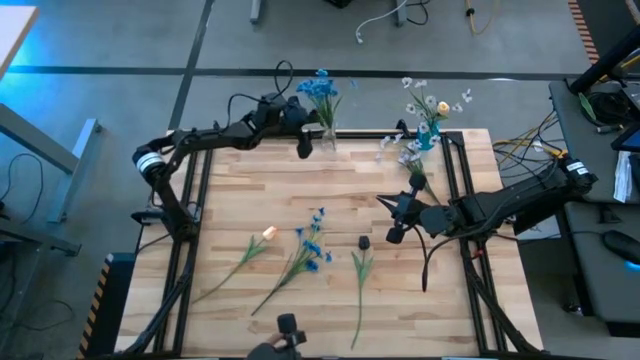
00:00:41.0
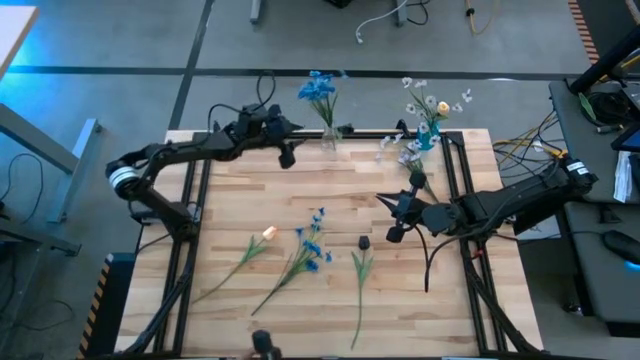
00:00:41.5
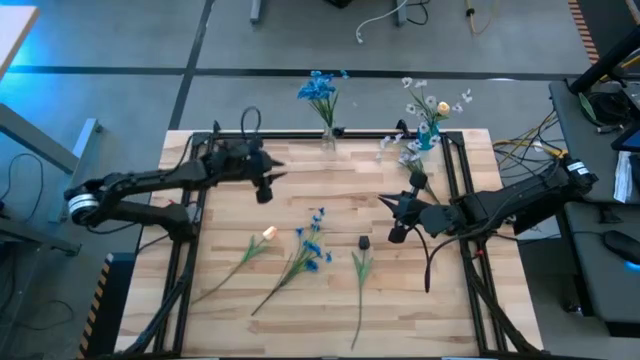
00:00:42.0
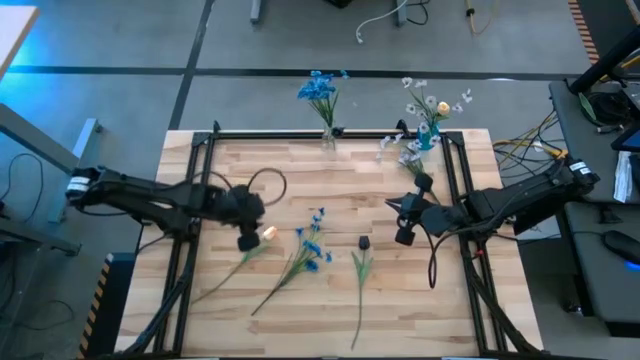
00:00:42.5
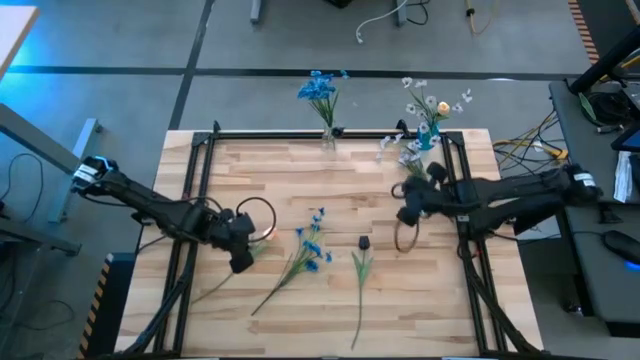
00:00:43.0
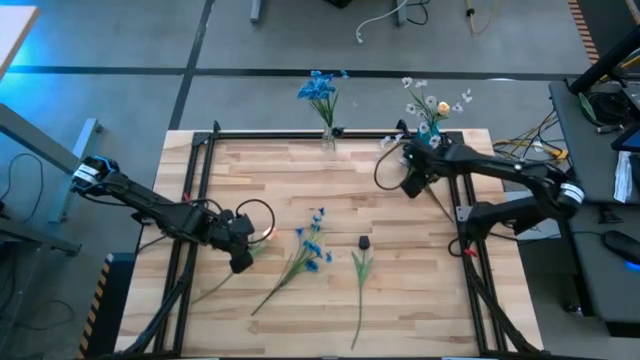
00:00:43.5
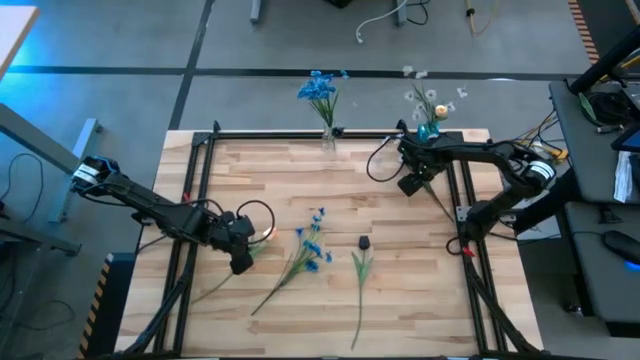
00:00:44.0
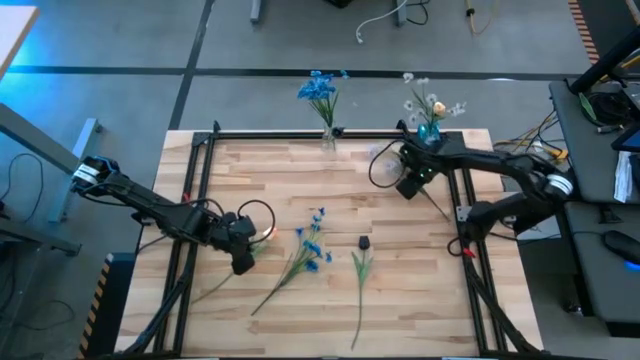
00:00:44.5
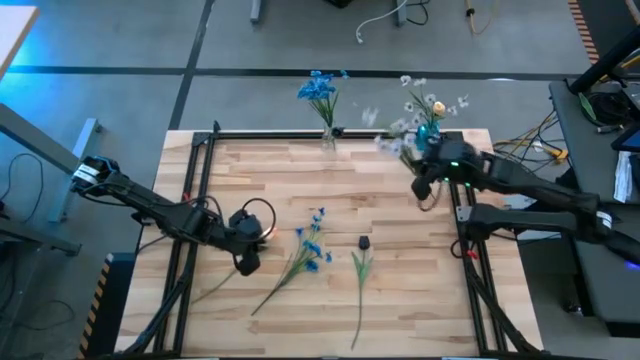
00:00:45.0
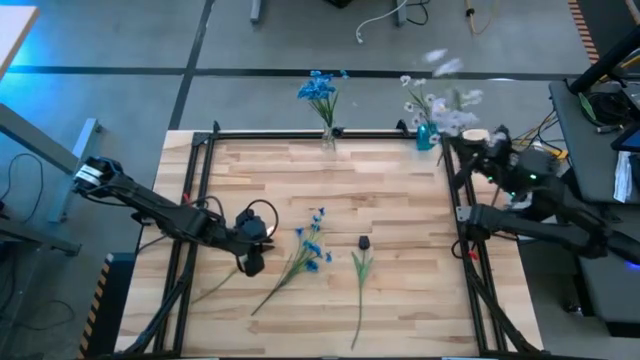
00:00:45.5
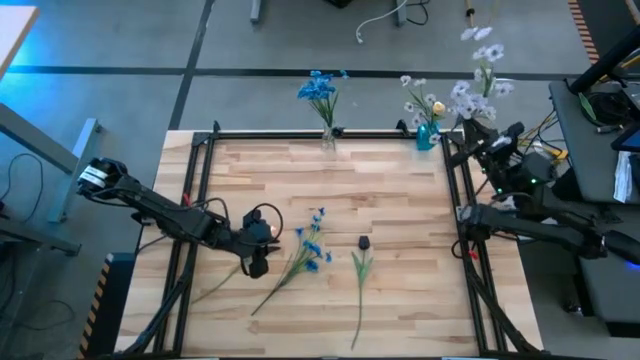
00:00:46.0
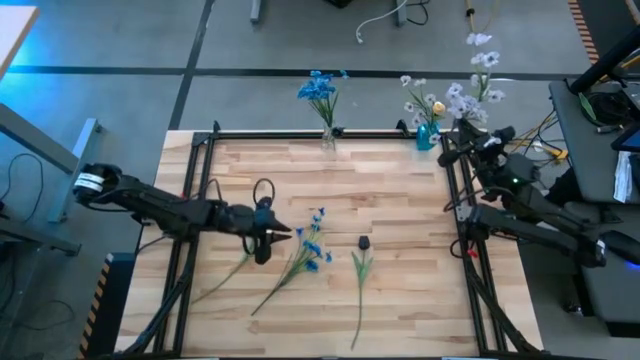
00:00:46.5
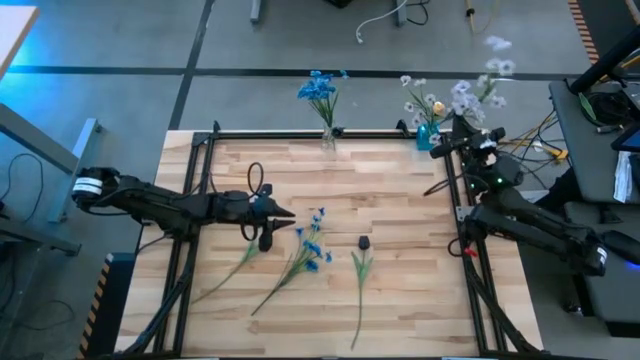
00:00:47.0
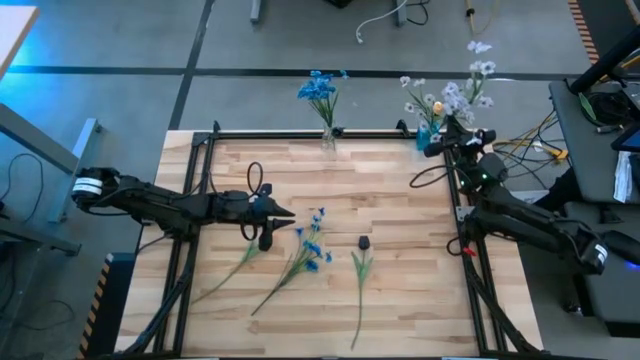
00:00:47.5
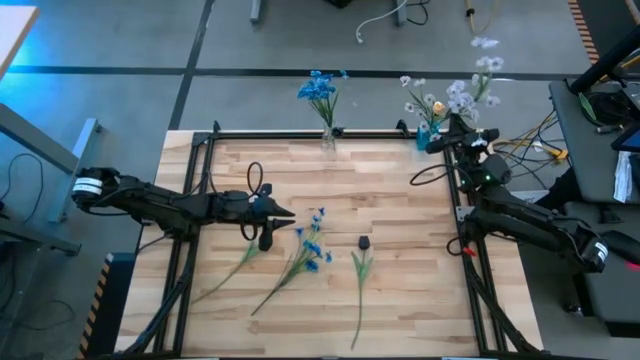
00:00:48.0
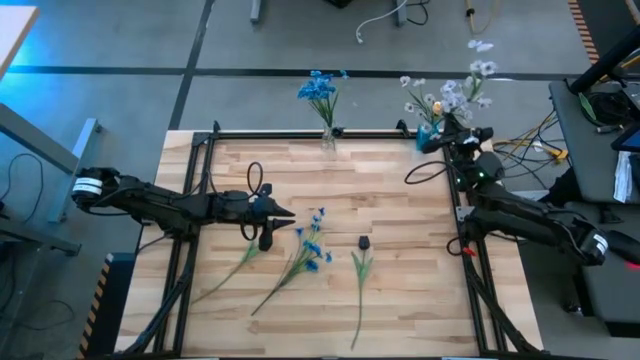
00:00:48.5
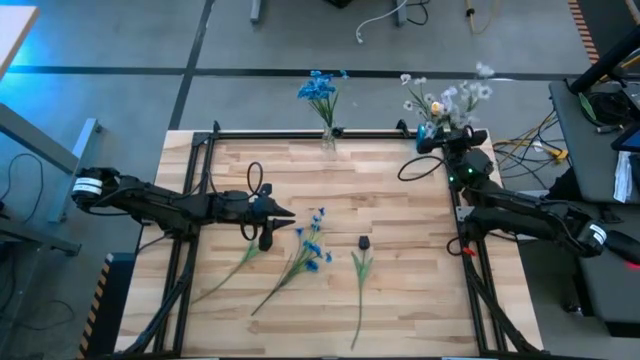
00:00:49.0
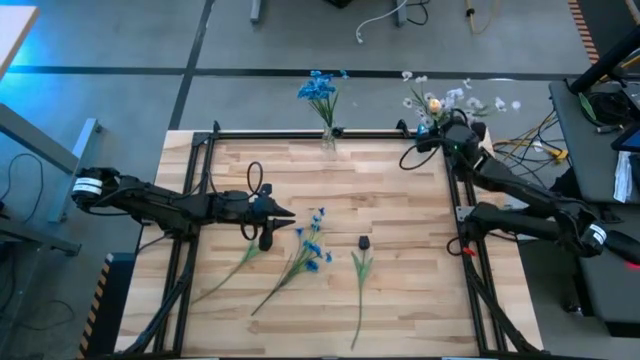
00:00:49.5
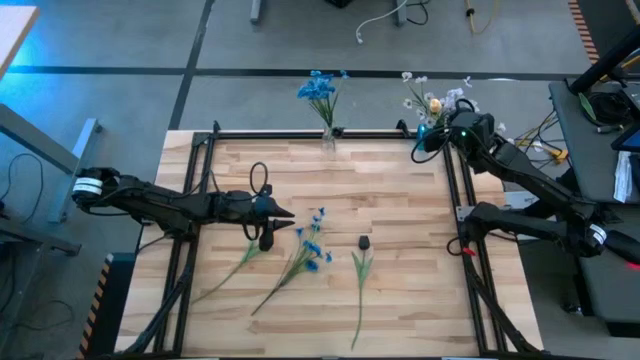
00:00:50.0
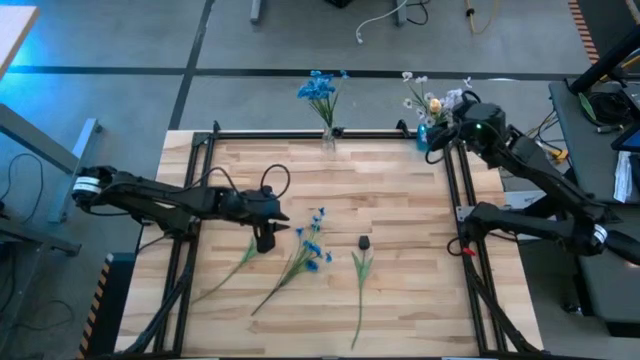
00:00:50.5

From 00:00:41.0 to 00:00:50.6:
Task: Sort flowers into vase by color
Put the white flowers into the blue vase

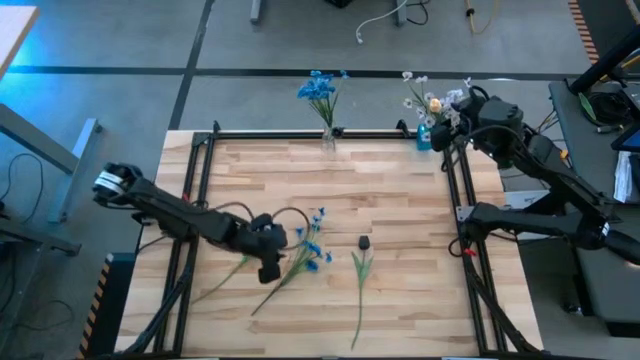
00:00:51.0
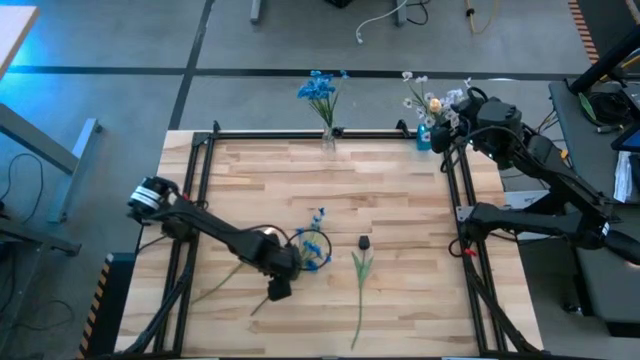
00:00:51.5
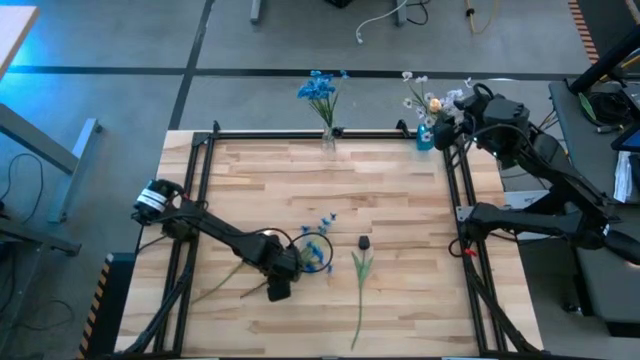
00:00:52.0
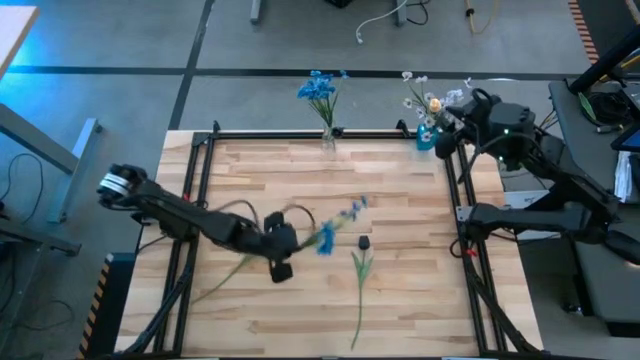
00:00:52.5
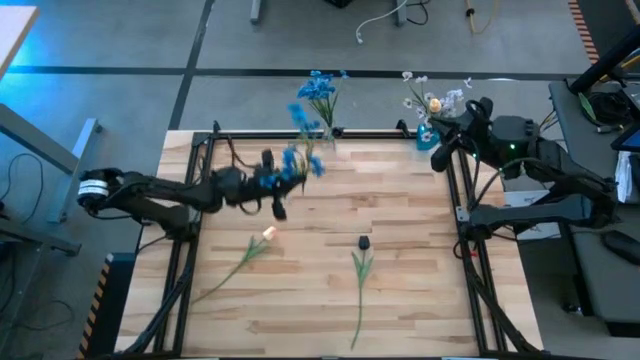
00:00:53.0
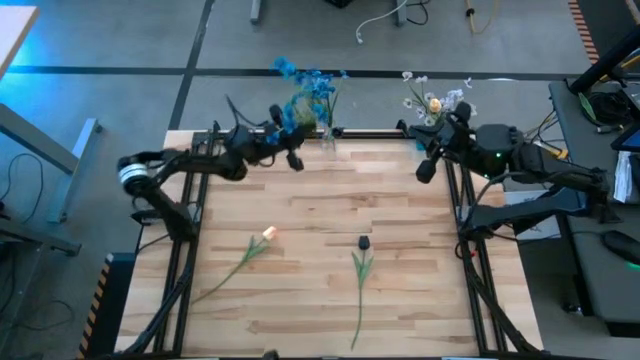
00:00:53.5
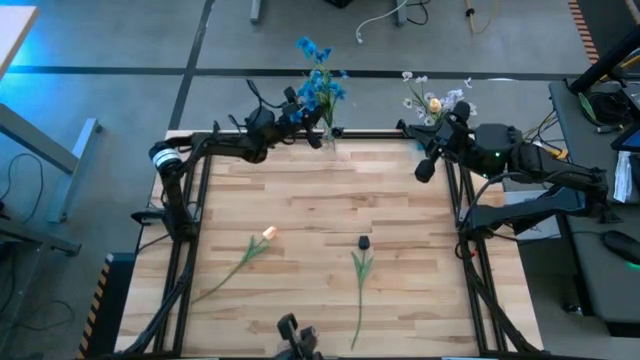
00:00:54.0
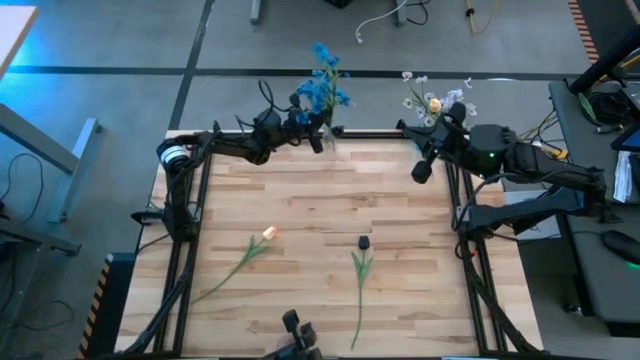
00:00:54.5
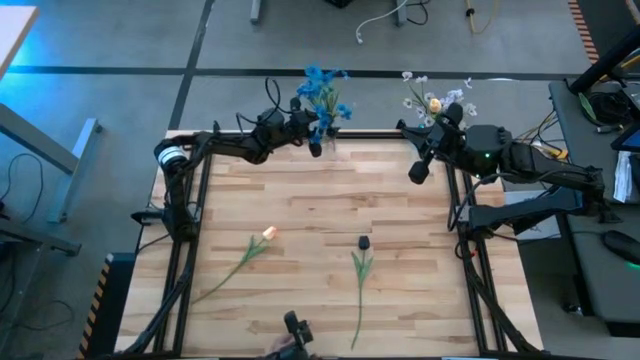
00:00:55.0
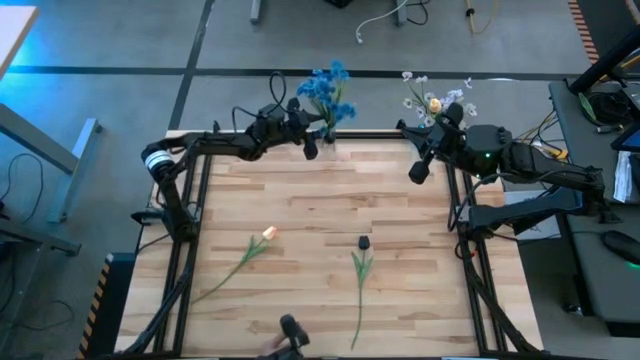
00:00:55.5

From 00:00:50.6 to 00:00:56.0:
Put the blue flowers into the transparent vase

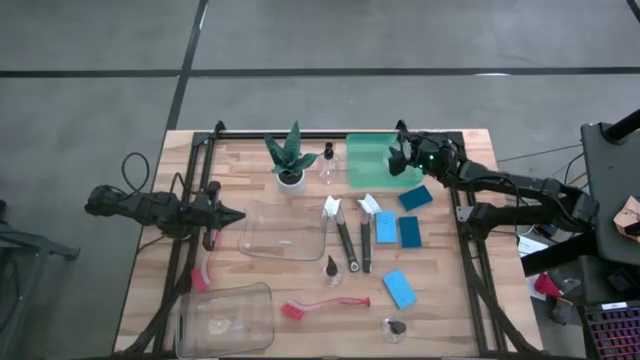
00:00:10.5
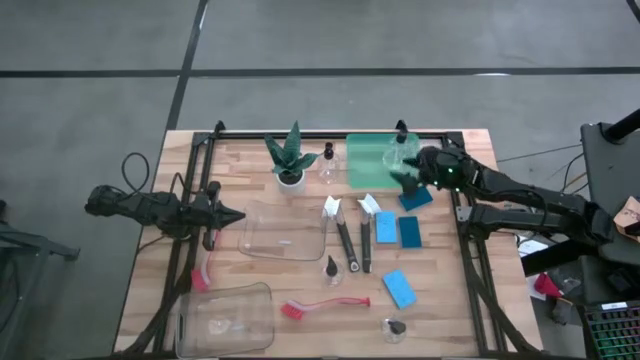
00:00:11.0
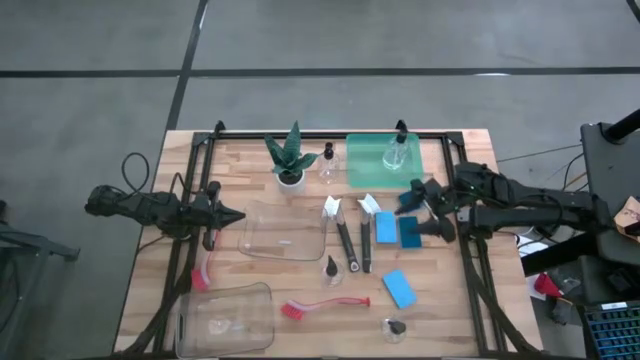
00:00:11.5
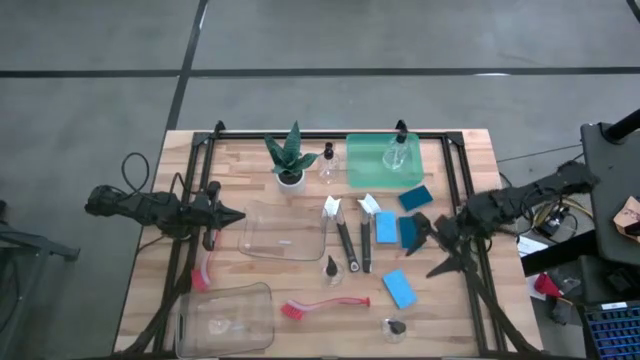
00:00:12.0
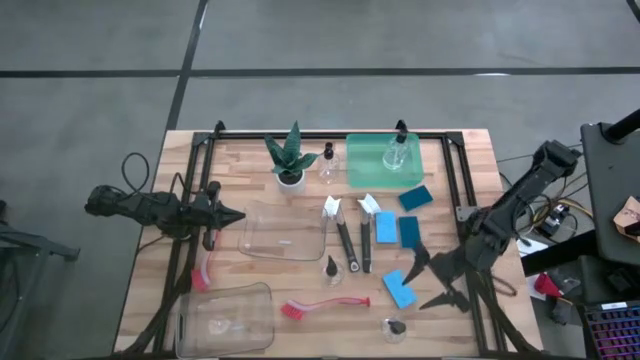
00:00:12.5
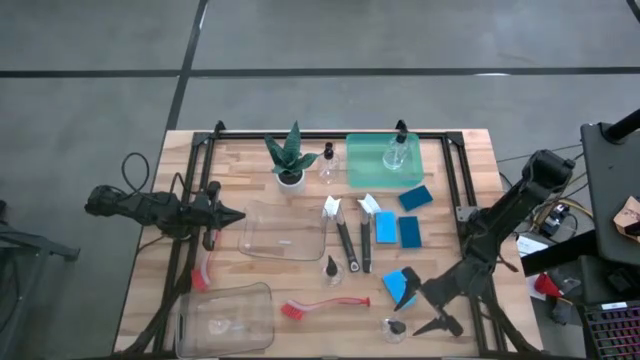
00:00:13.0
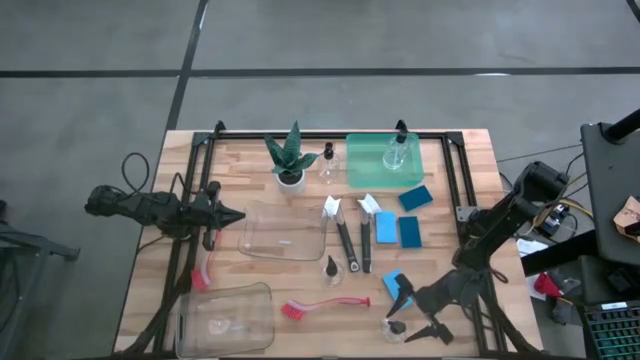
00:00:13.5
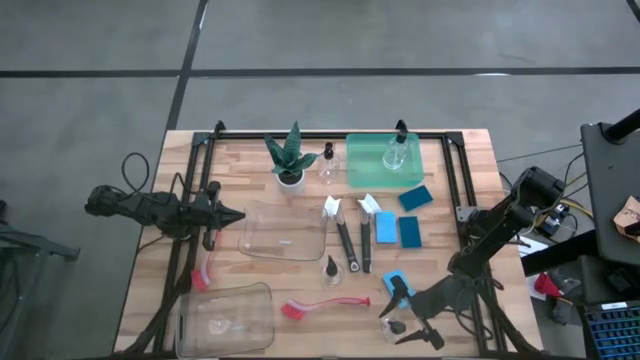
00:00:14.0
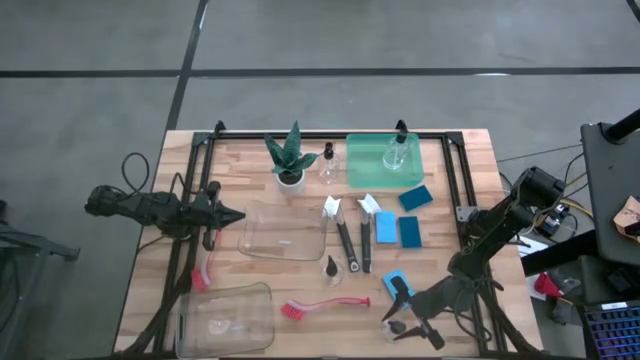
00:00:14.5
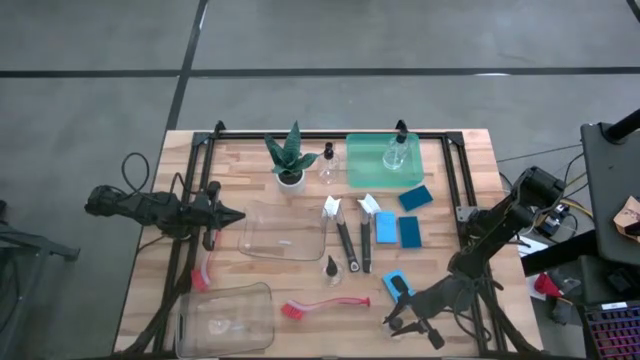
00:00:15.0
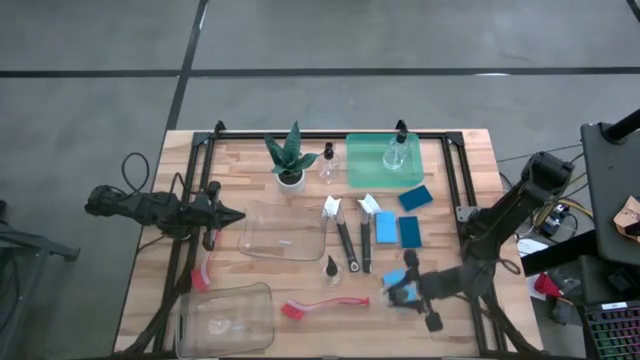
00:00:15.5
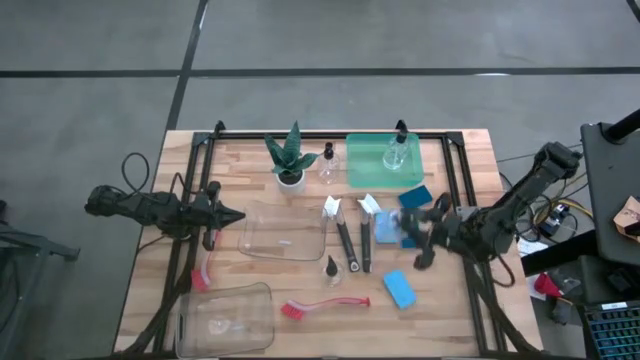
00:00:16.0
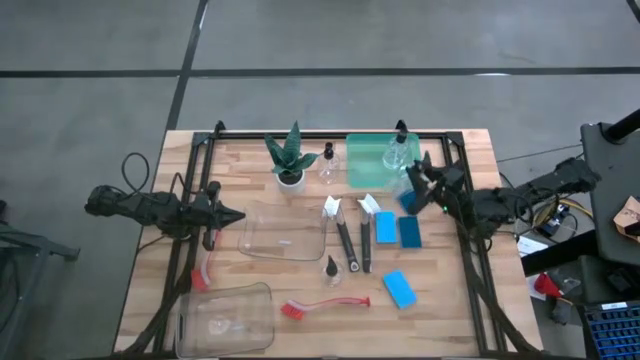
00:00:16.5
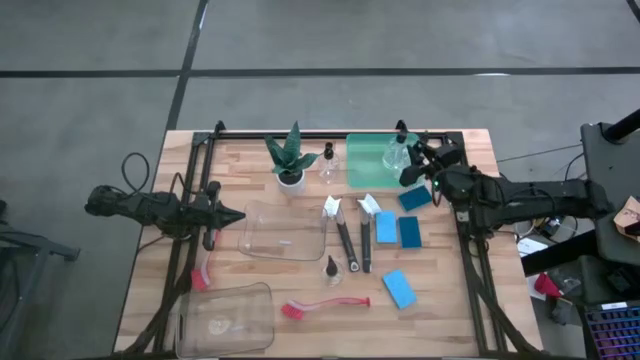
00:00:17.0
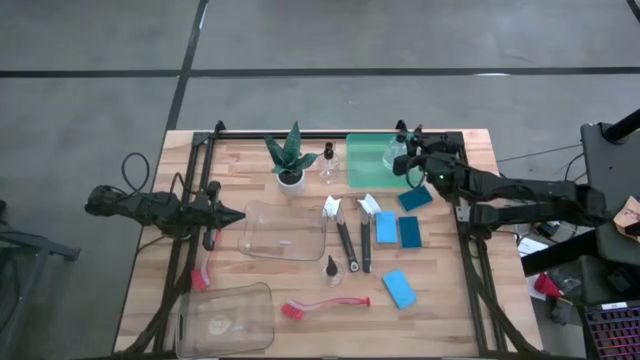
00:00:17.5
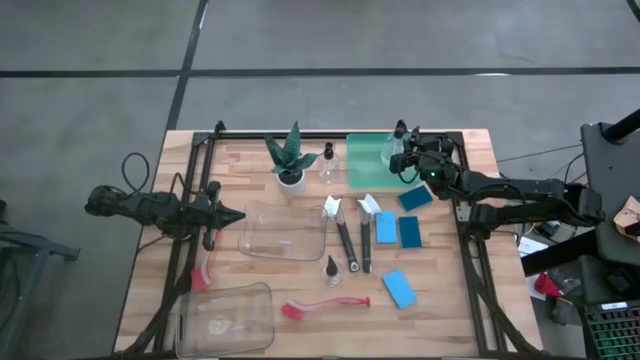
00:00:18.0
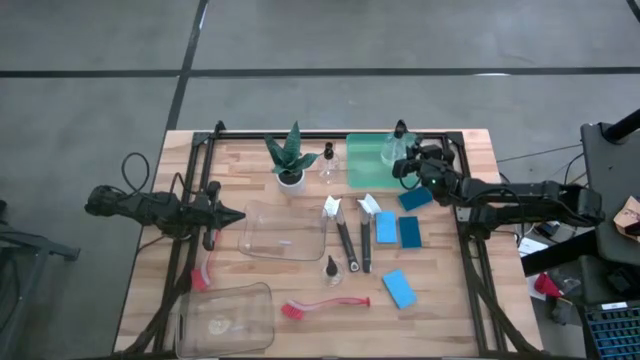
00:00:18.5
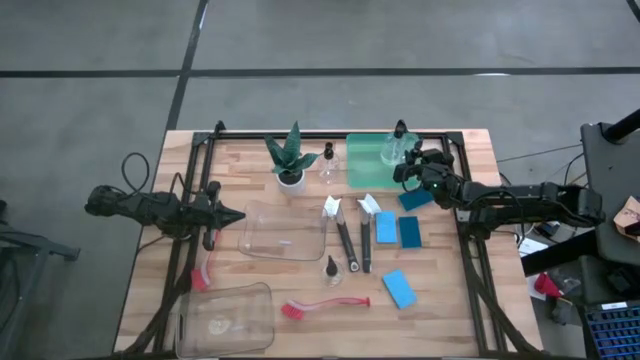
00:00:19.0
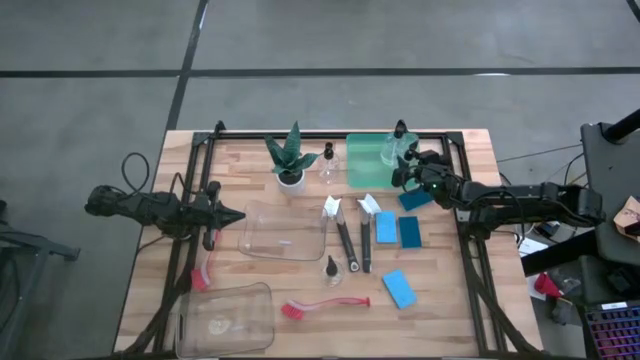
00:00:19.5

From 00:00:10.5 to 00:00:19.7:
Task: Pick & Place Kitchen Sink Supplies
Put the transparent soap dispenser into the blue bin
